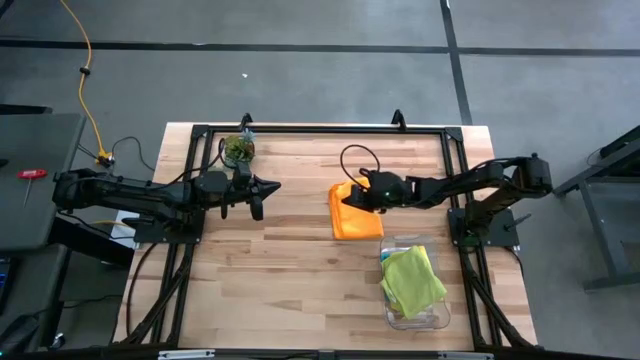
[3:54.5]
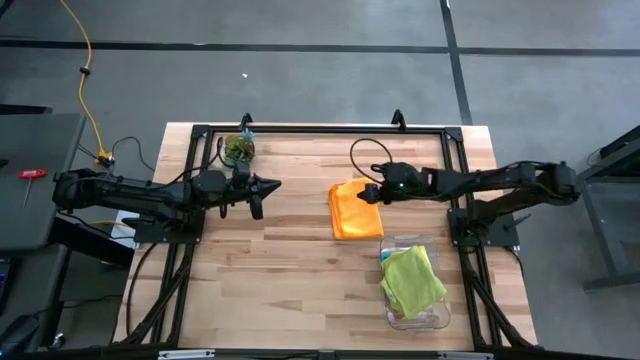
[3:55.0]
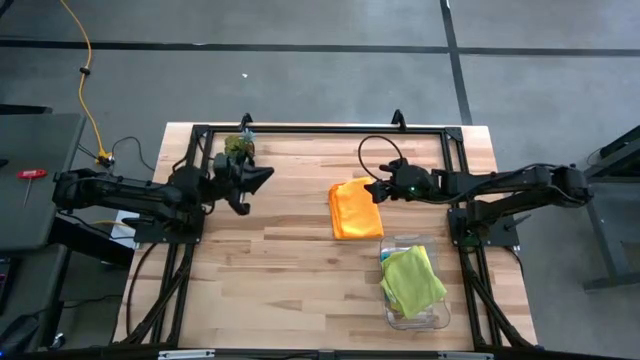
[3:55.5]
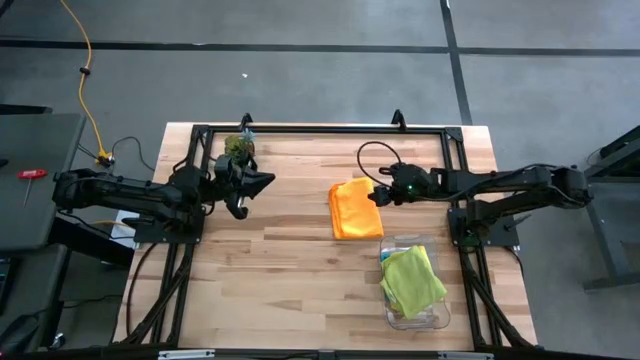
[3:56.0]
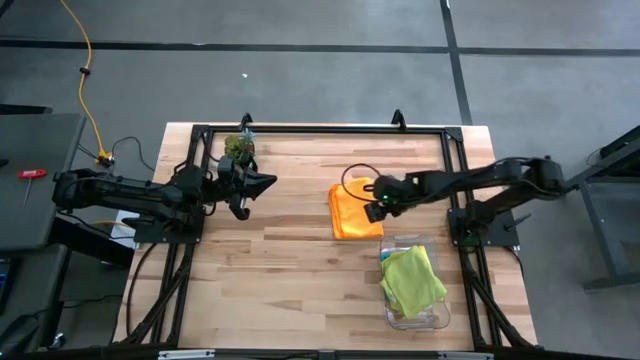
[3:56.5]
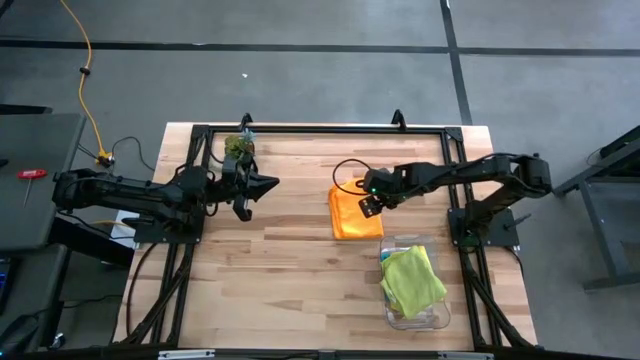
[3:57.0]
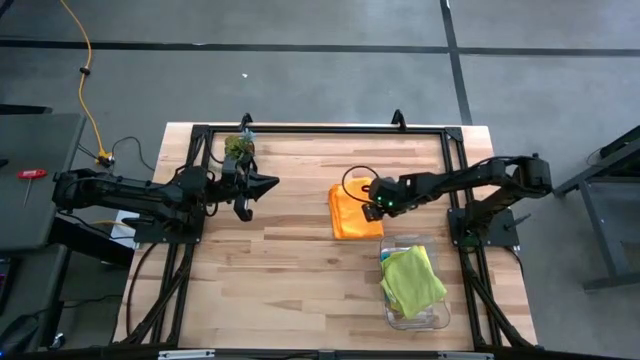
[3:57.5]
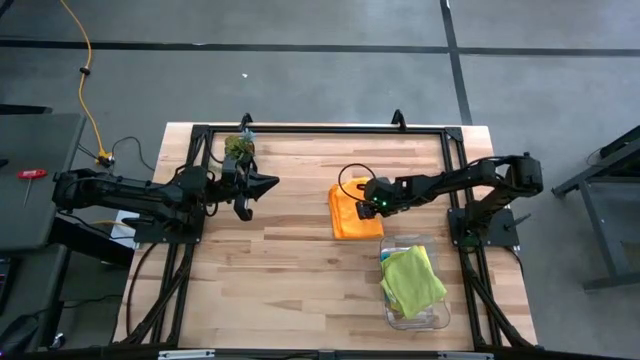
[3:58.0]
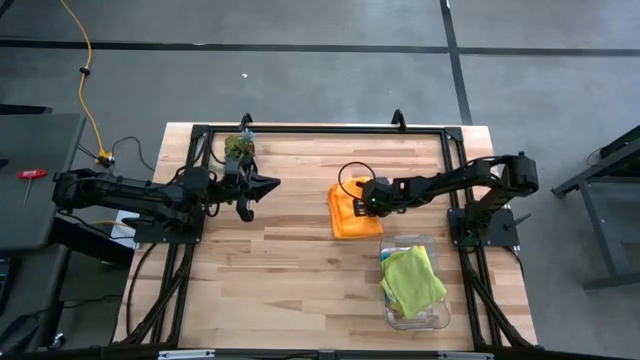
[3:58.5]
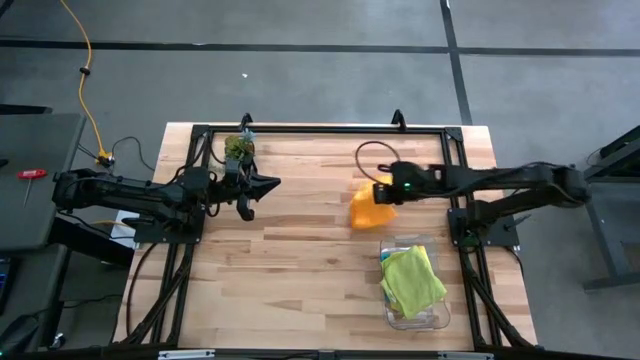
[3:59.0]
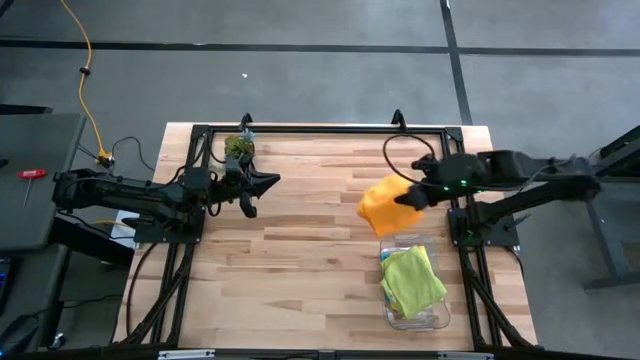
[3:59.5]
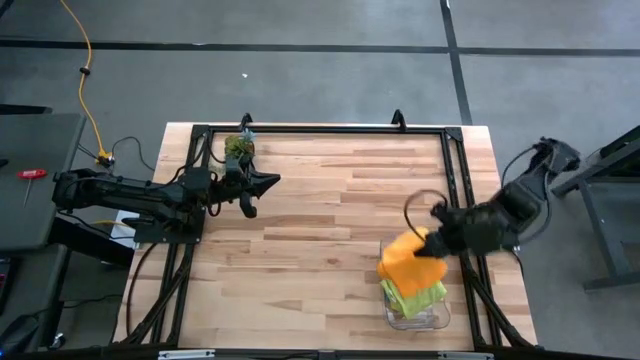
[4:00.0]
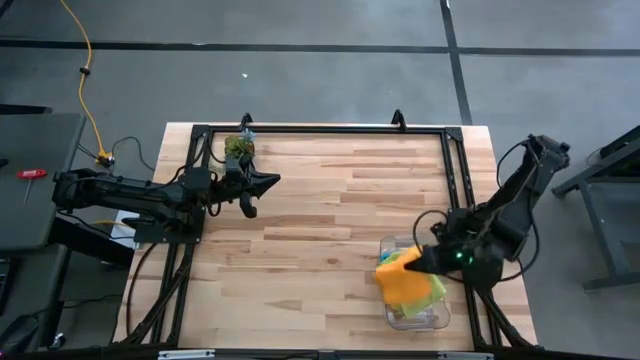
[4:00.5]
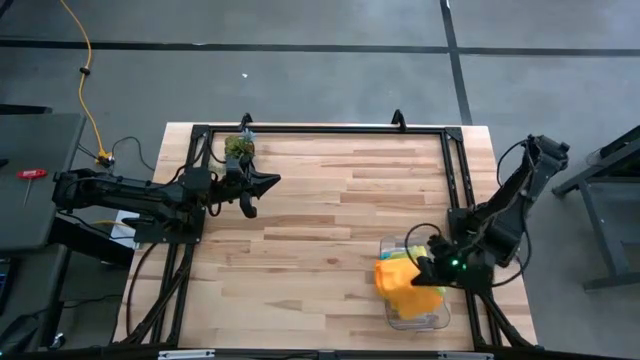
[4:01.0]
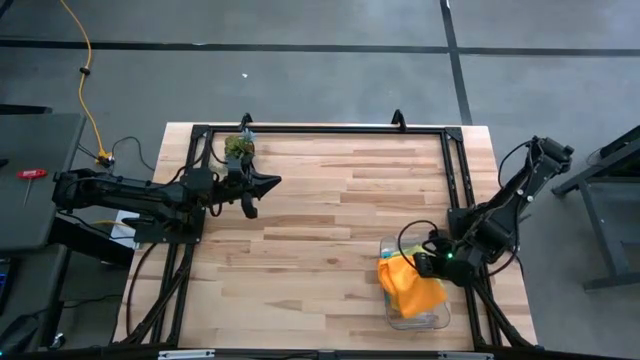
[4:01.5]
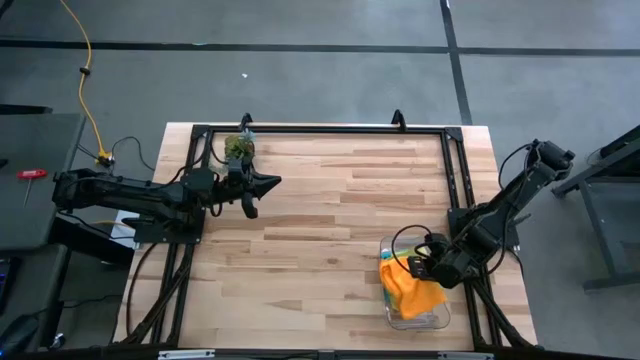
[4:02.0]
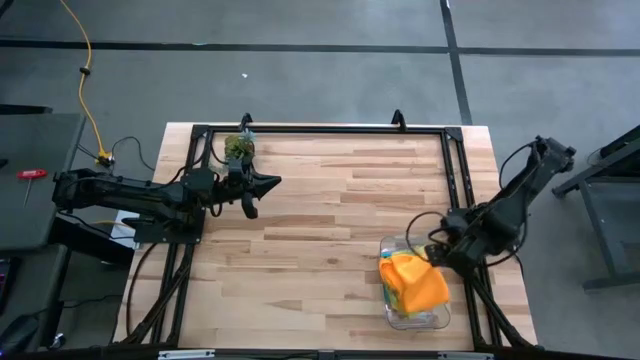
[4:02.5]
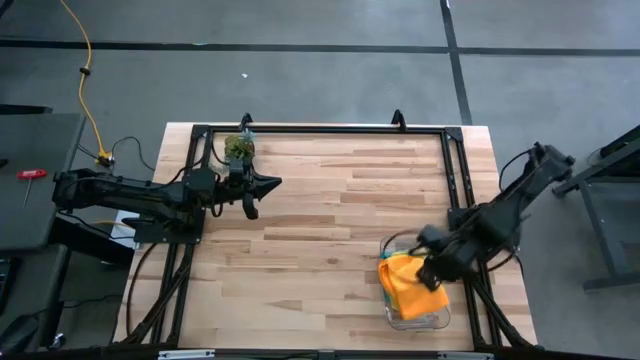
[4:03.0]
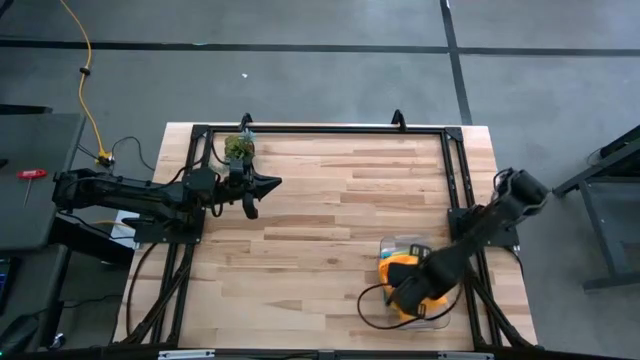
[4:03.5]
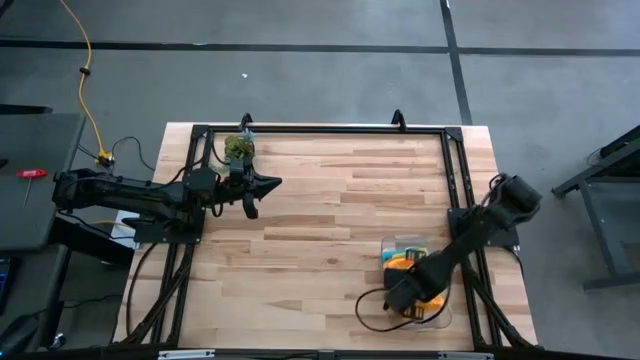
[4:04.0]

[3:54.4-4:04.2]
Task: Fold microfiber towels
Stack the folded orange microfiber cloth on top of the green microfiber cloth in the transparent bin

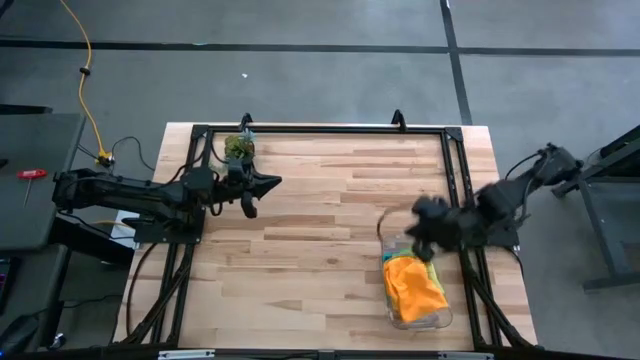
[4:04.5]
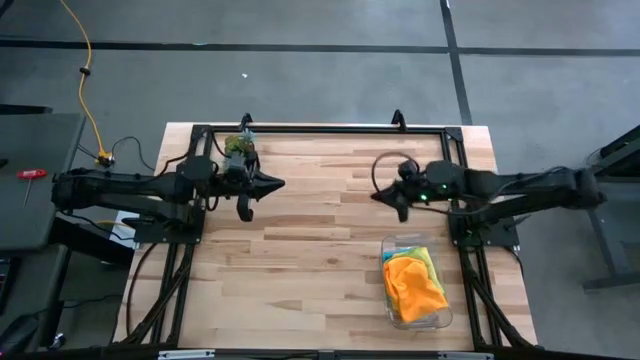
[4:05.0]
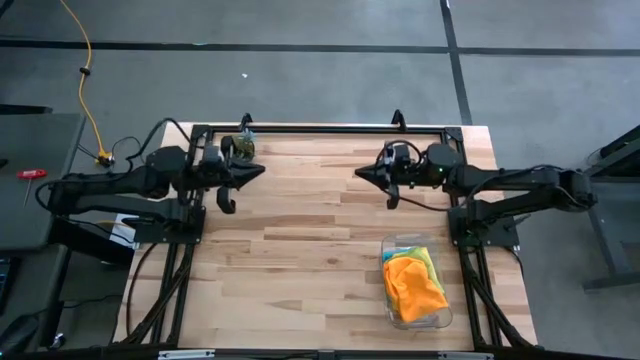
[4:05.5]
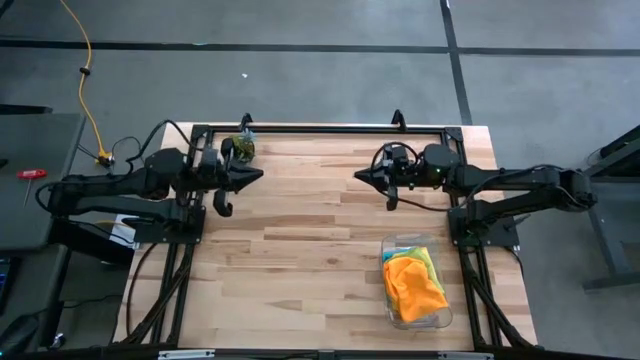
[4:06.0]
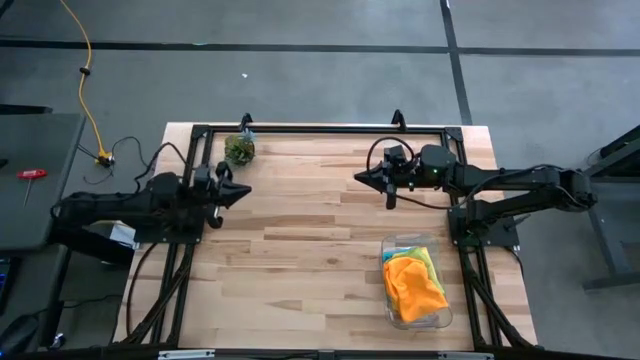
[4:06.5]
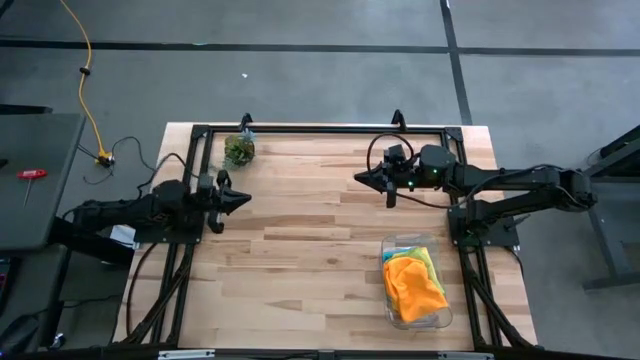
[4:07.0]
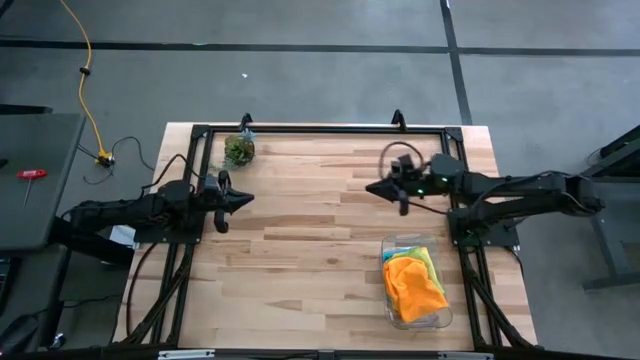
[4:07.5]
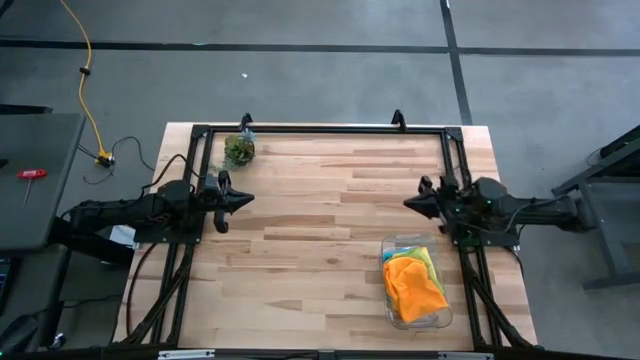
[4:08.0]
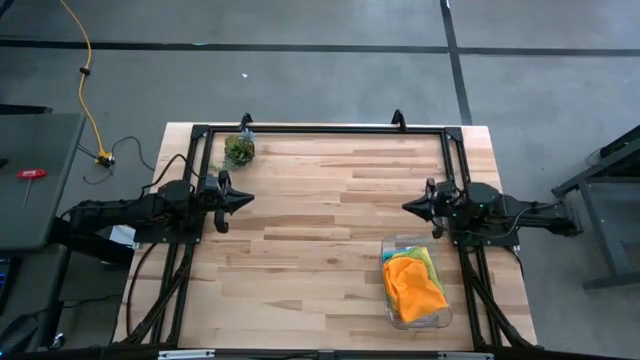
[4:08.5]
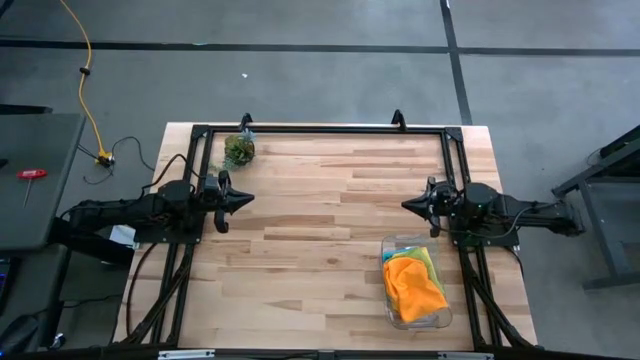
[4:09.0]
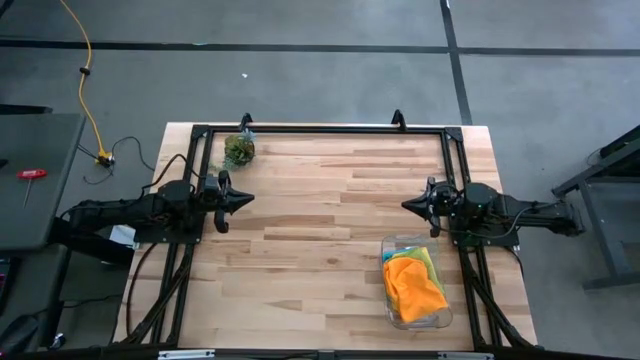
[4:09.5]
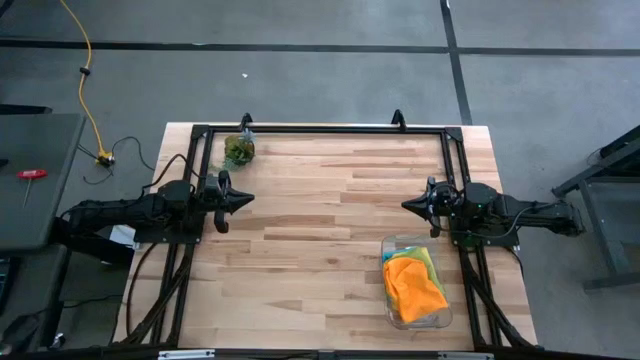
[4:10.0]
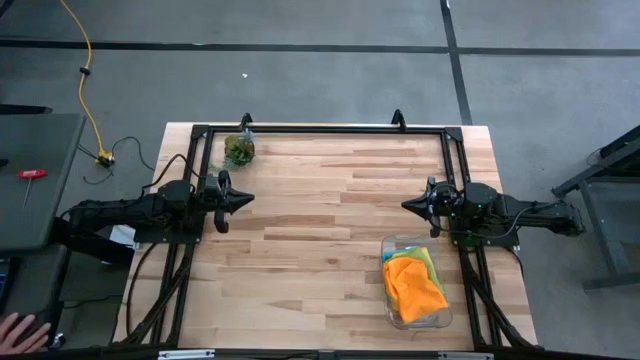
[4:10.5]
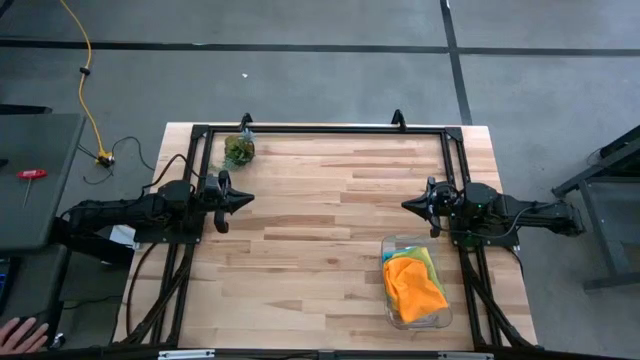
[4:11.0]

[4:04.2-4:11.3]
Return to Home Position

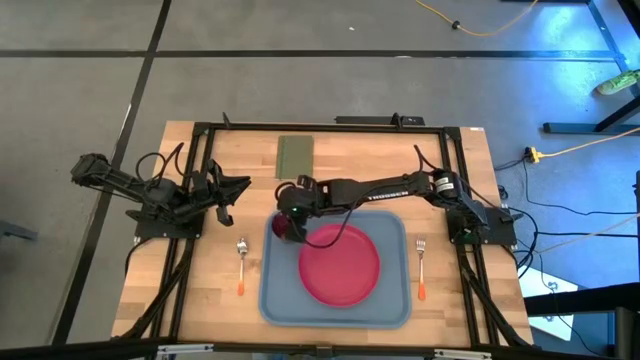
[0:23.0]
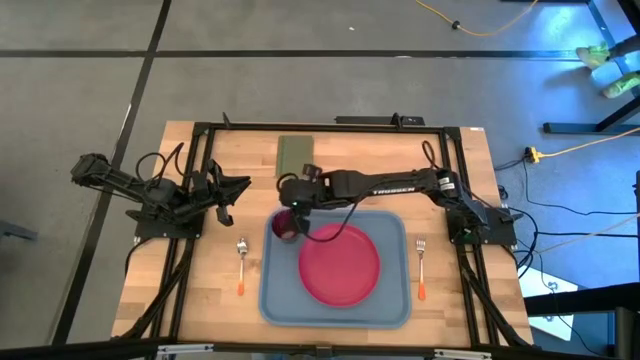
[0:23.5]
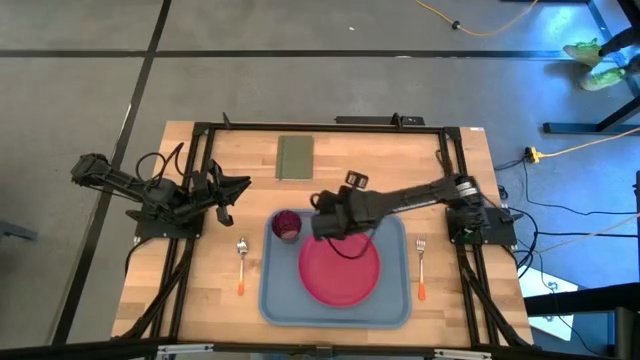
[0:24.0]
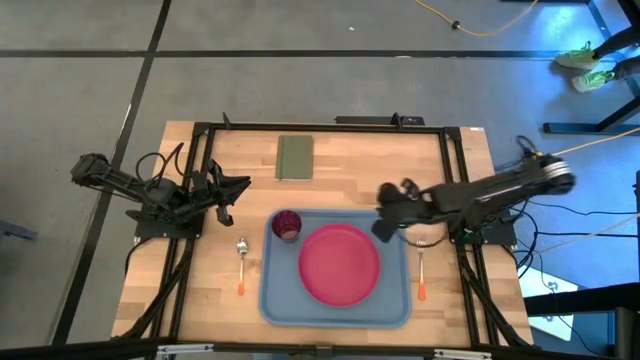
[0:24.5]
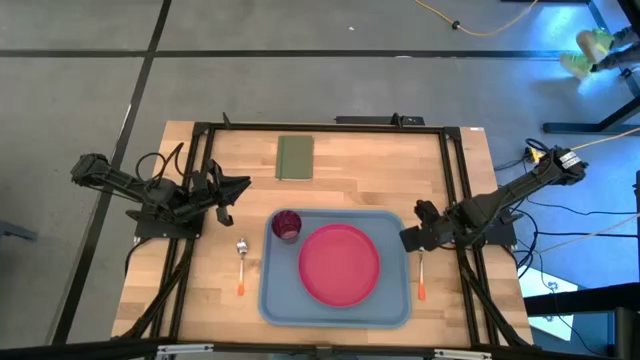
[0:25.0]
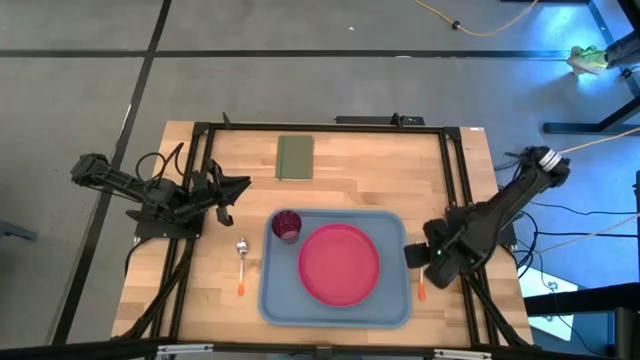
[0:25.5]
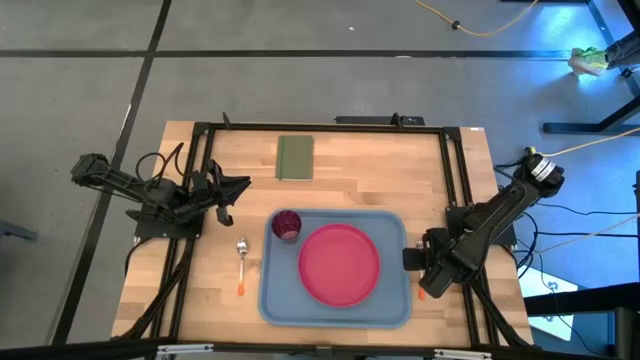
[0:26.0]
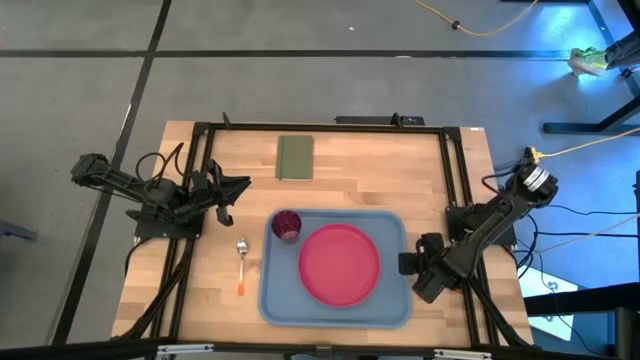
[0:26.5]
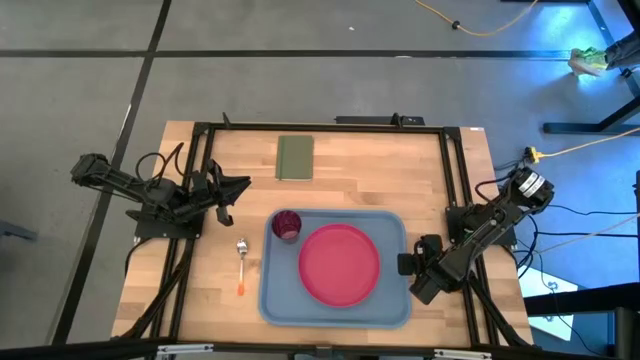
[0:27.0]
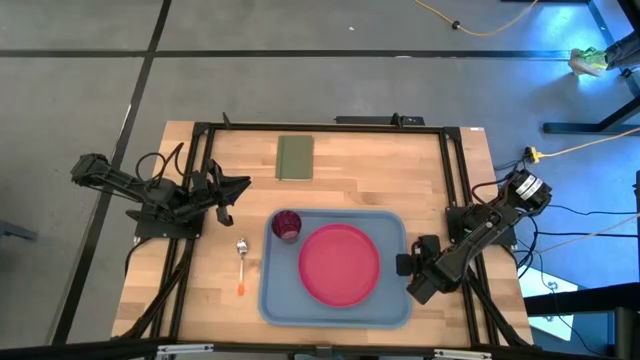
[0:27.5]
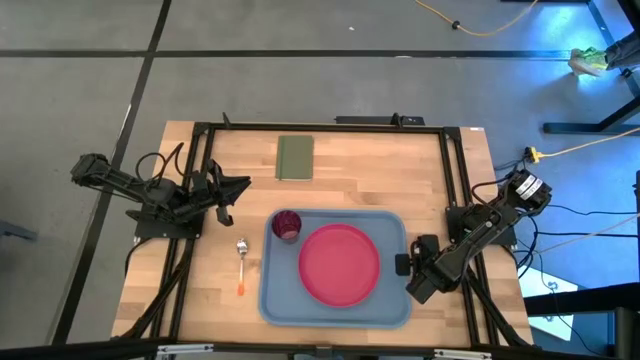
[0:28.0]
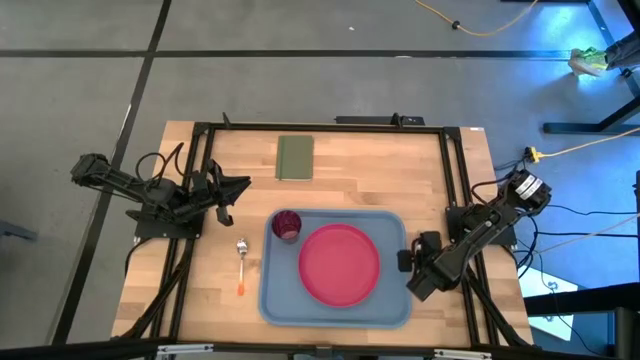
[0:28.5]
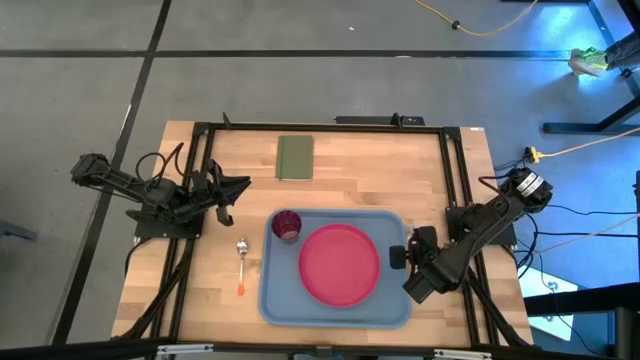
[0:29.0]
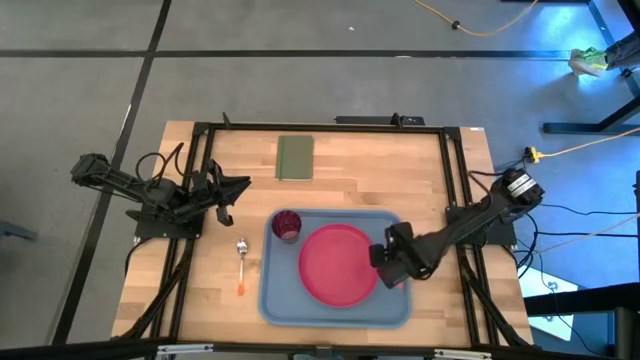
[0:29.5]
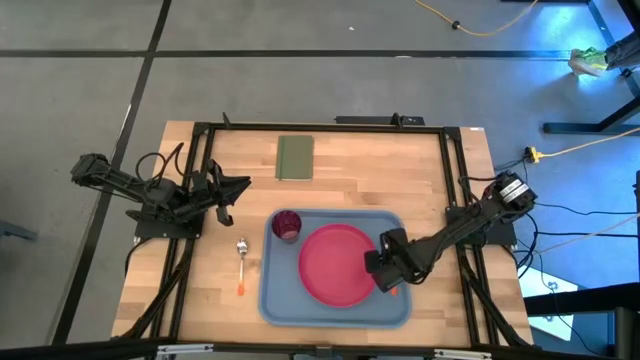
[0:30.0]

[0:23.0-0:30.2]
Task: Pick and place plate/cup/fork/spoon on tray
Put the orange fork on the blue tray to the right of the pink plate
